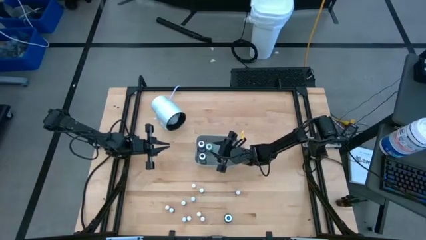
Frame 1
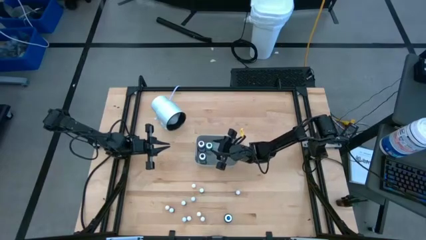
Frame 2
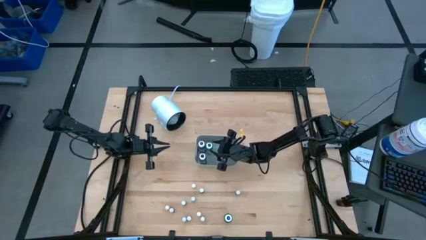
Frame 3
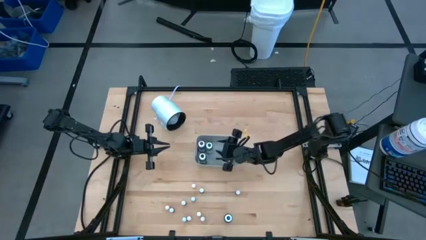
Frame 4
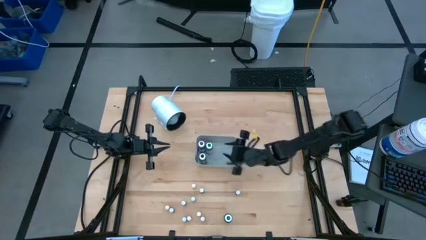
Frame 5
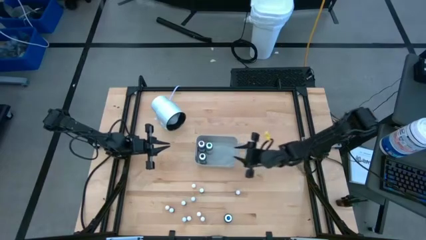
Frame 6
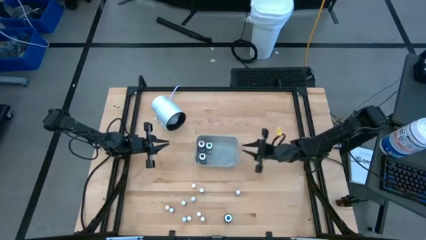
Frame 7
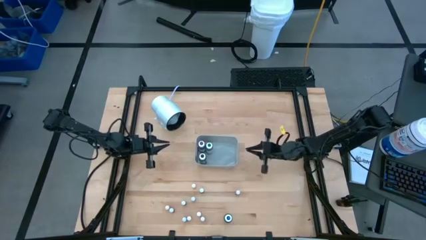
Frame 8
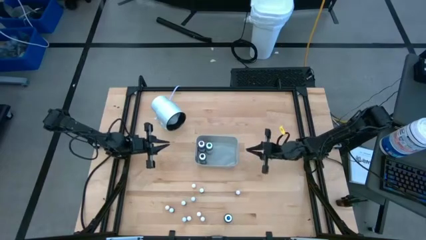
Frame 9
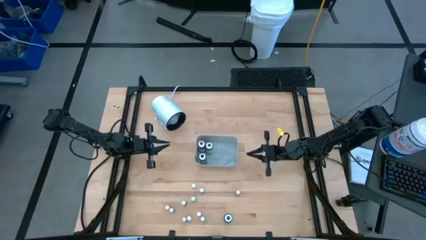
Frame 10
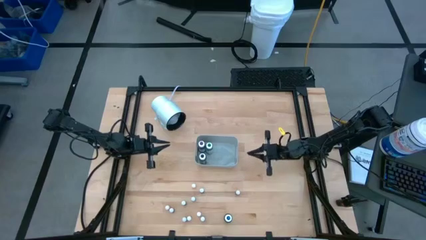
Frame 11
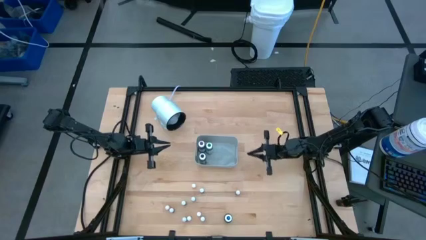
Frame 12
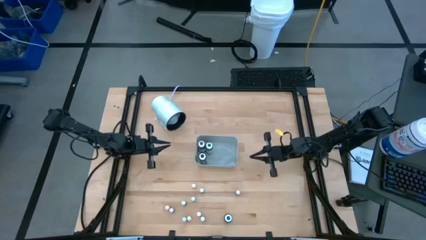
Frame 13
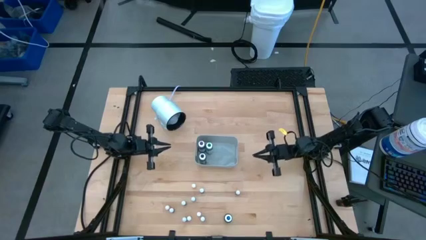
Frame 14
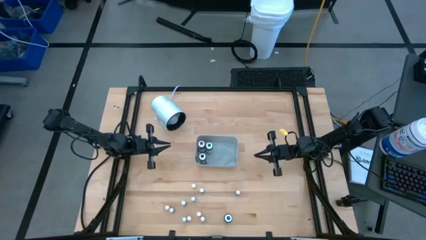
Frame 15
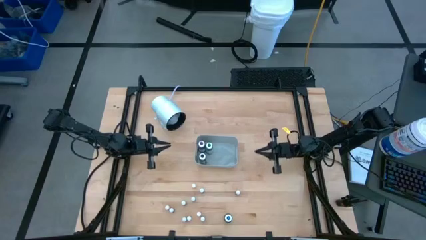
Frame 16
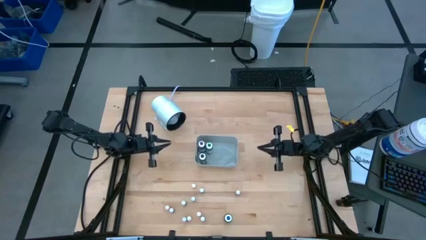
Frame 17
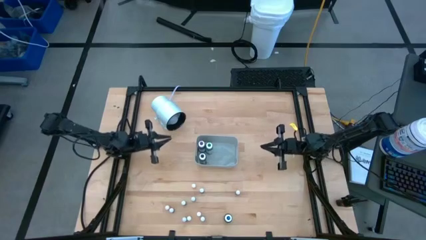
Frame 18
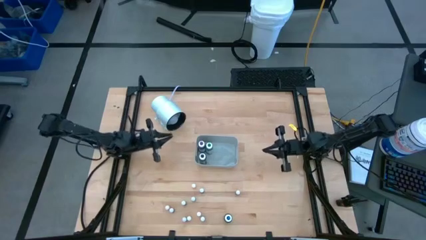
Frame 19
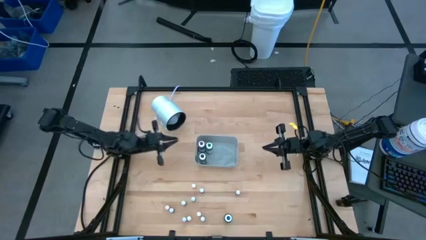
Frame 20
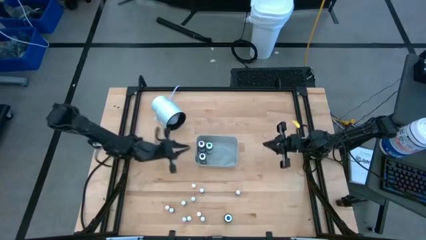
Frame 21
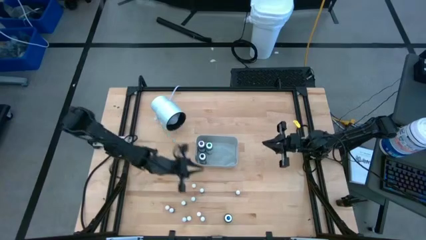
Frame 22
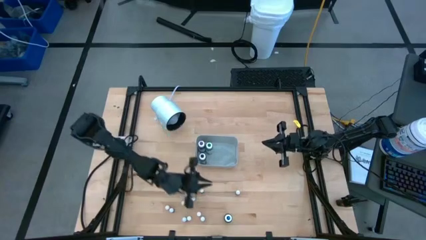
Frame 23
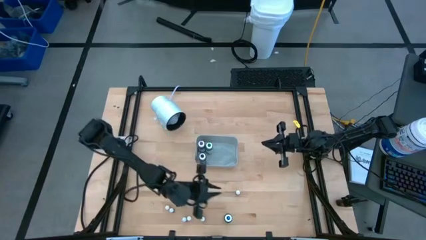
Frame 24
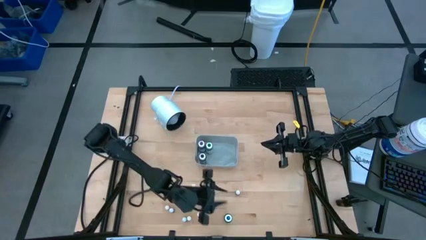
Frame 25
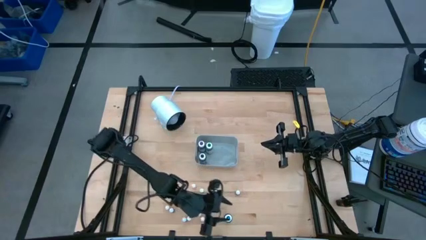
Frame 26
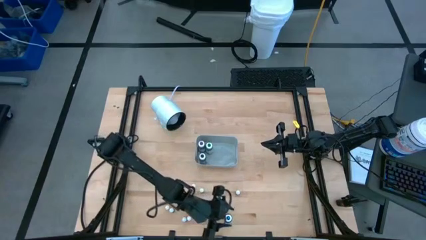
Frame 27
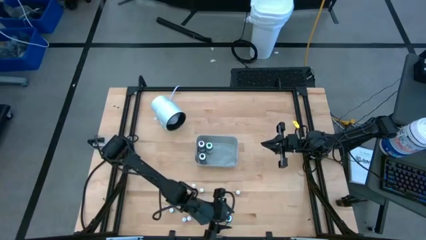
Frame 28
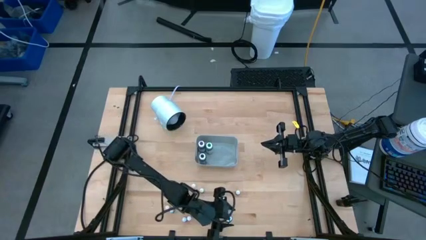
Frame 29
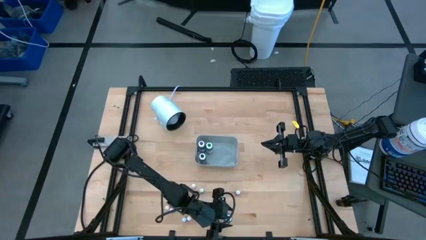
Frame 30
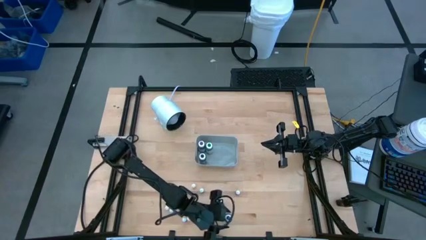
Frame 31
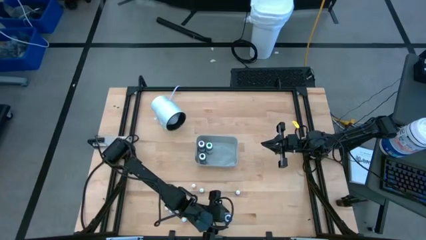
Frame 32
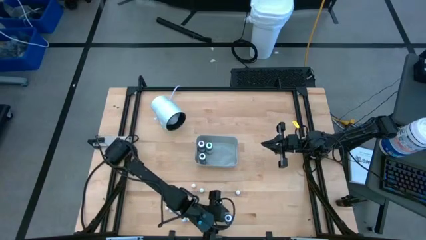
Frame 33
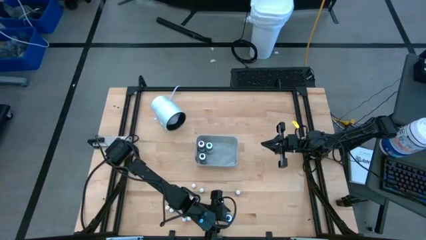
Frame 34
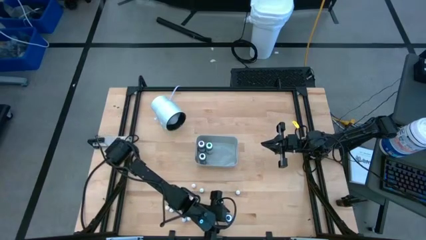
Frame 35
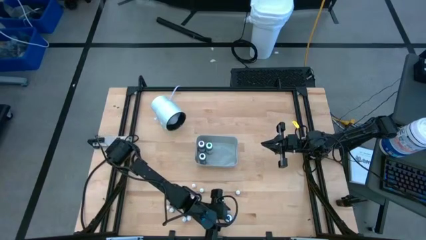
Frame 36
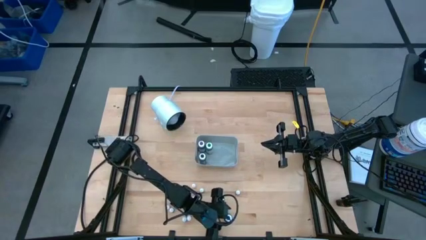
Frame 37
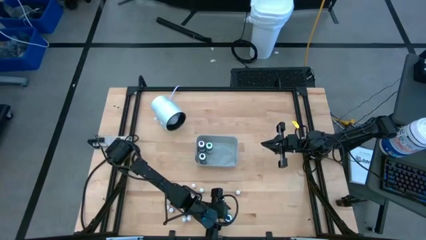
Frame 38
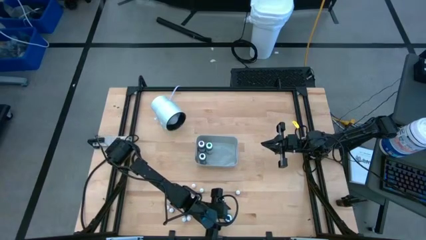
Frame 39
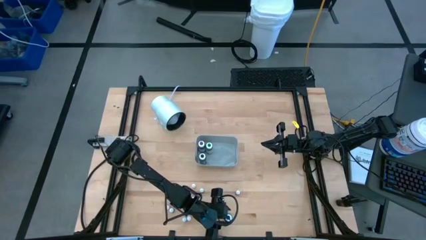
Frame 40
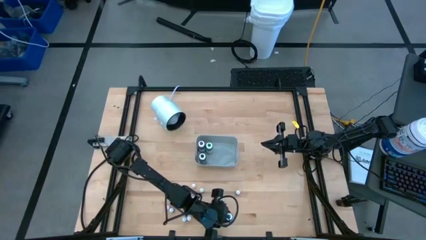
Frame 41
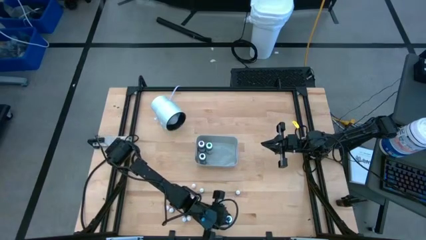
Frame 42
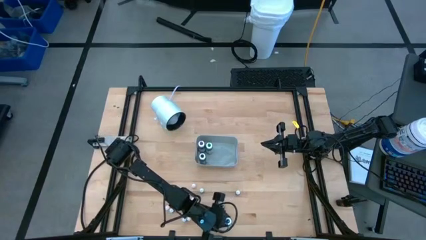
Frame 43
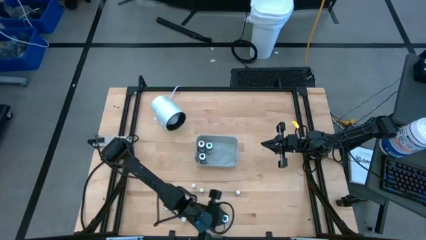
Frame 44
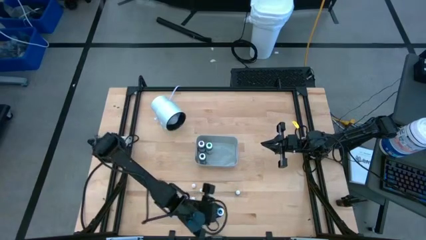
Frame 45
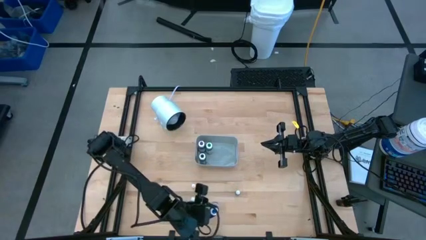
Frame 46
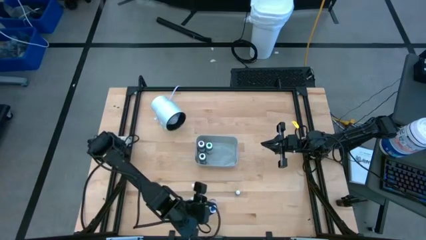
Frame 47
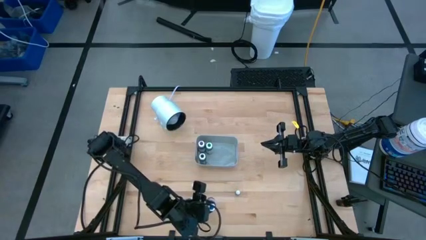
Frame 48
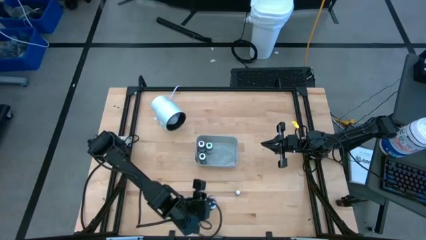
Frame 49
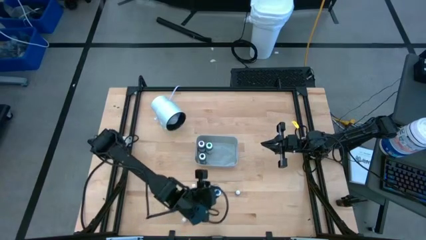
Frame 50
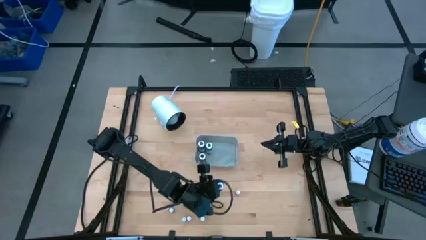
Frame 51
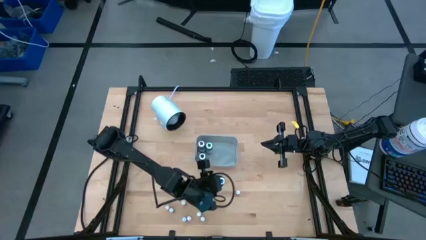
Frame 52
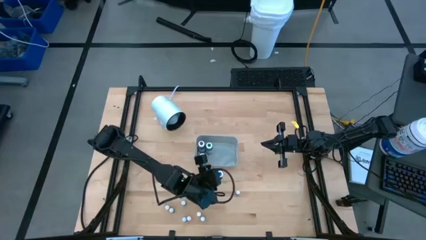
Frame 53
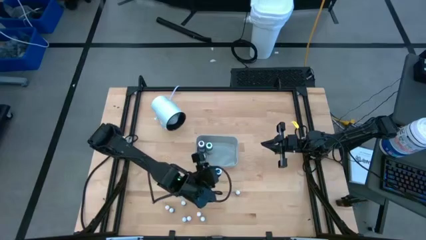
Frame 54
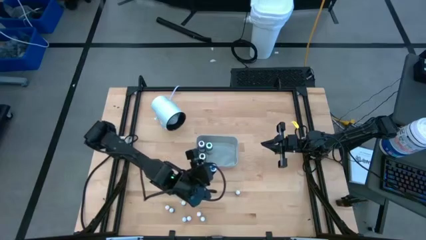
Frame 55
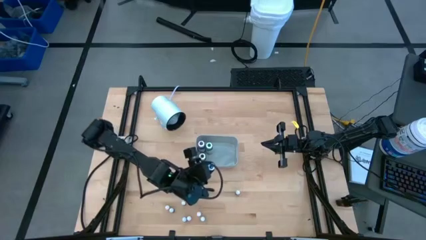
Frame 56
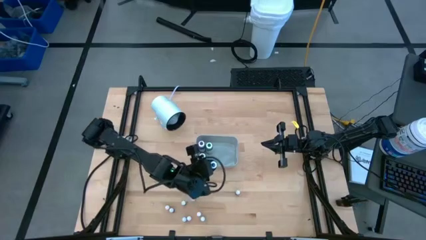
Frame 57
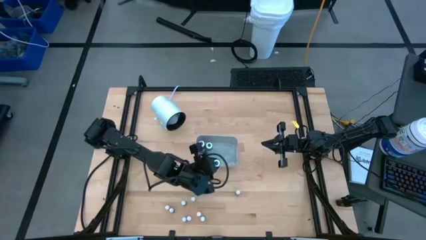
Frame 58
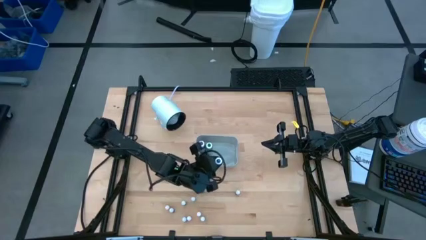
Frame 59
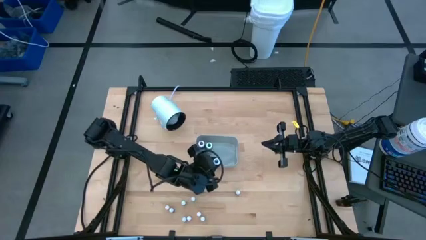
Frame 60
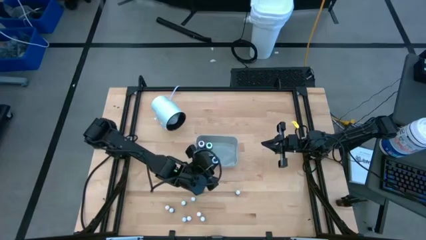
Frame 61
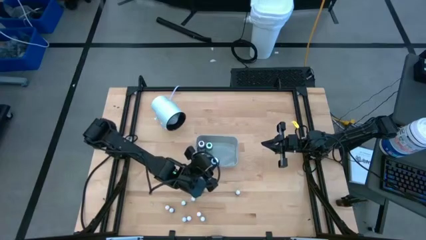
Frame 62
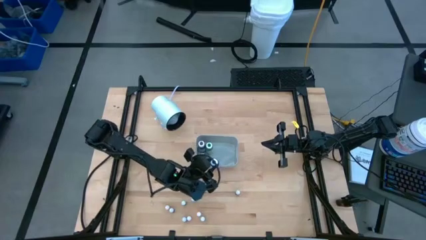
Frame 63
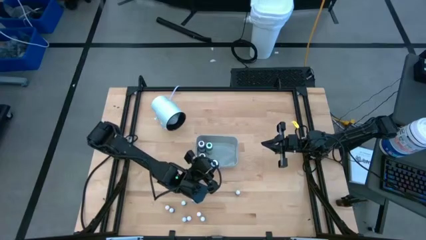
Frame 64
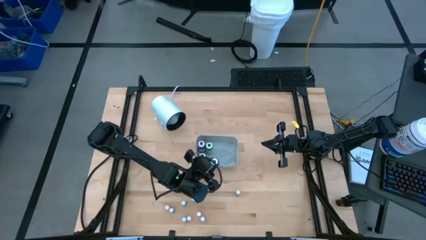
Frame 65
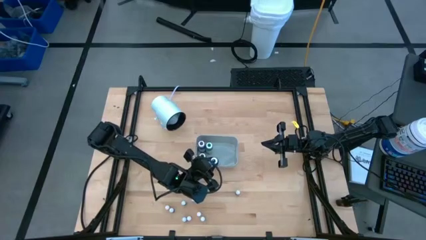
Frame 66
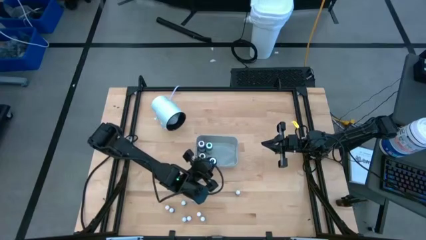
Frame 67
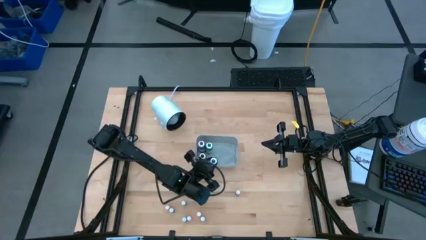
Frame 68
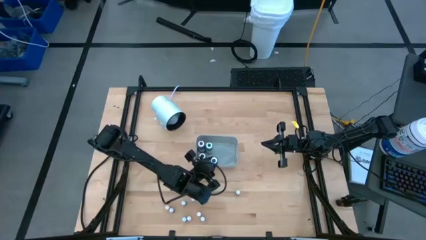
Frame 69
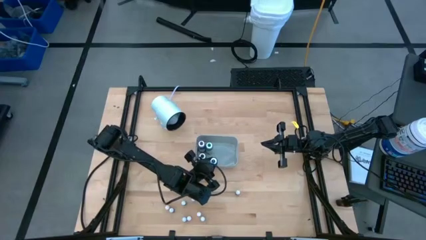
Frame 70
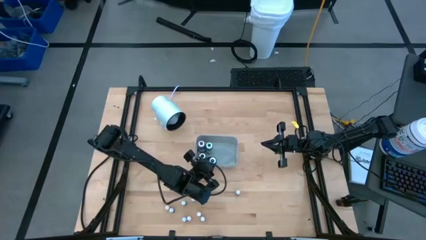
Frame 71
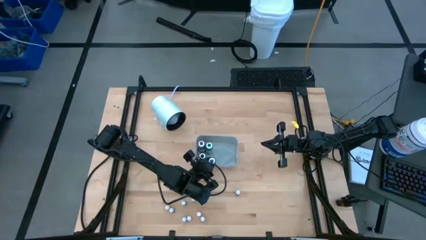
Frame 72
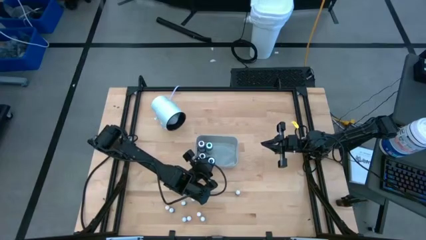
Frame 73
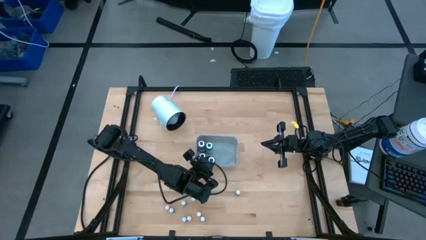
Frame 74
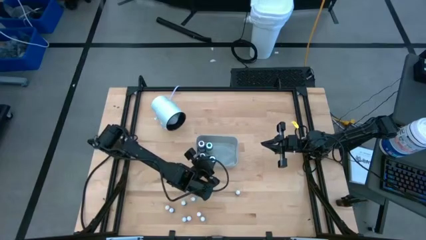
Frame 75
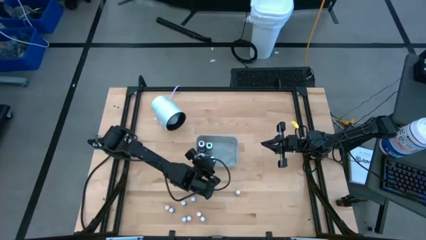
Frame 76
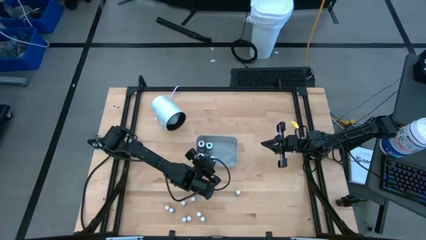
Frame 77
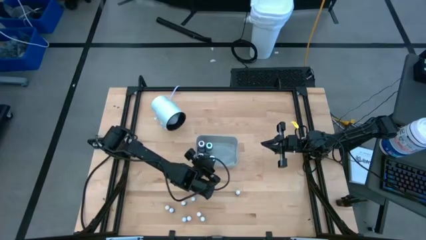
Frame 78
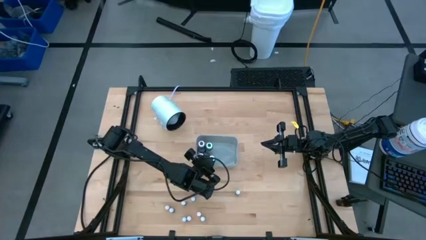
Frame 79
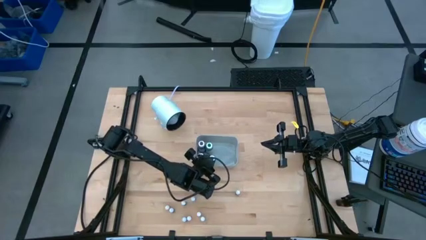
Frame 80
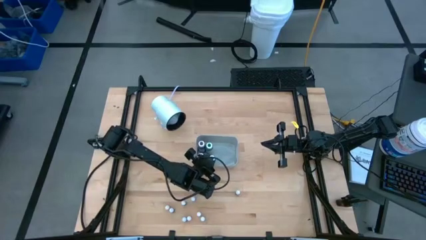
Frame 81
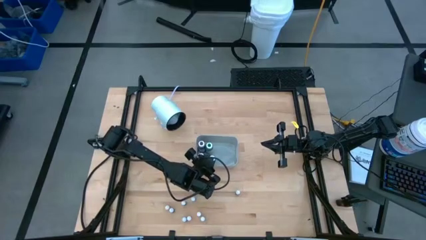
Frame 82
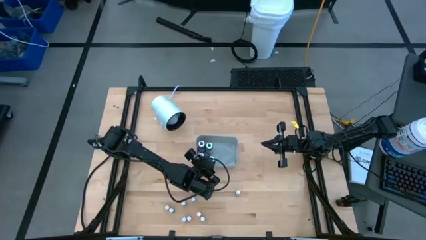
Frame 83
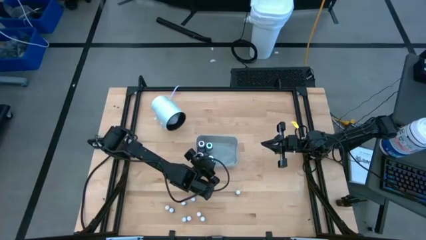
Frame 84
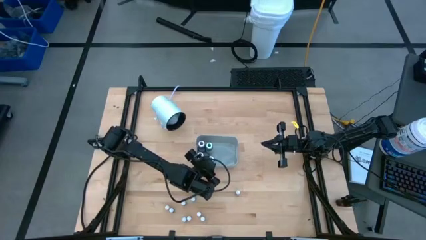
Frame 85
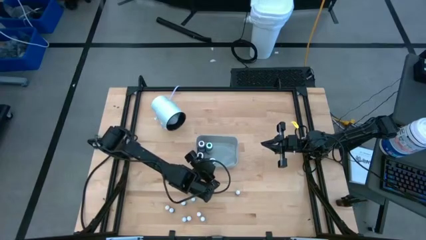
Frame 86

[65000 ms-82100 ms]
Task: Pick & Place food coloring
Put the big blue food coloring bottle into the gray bin
